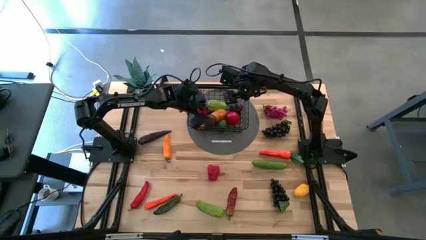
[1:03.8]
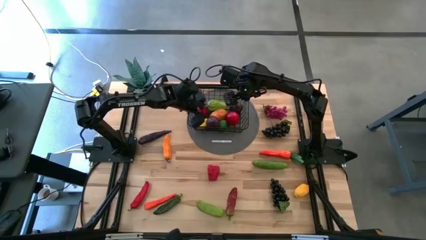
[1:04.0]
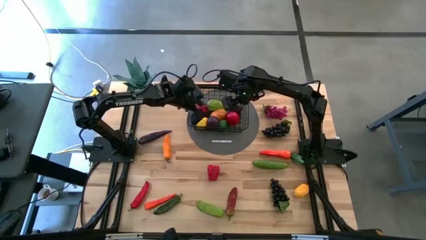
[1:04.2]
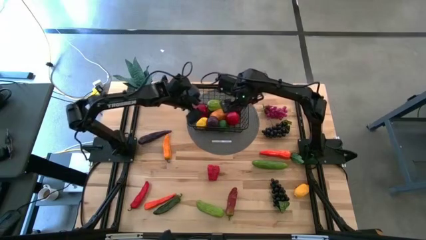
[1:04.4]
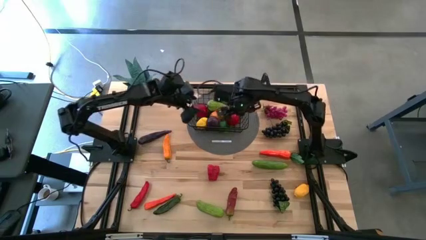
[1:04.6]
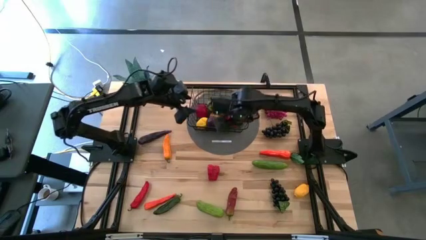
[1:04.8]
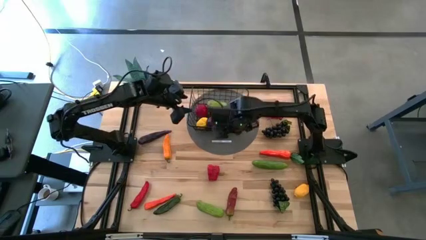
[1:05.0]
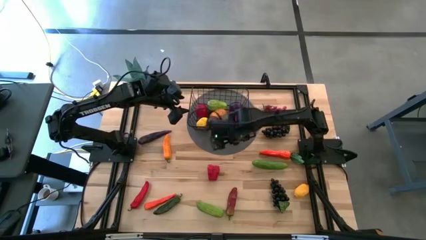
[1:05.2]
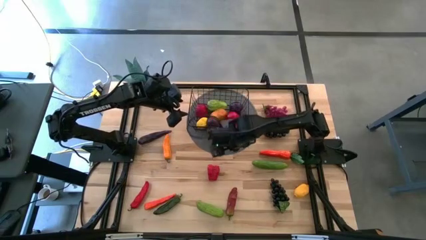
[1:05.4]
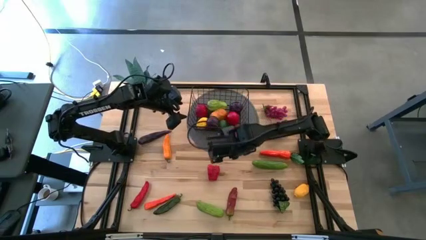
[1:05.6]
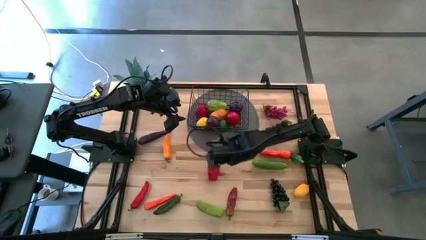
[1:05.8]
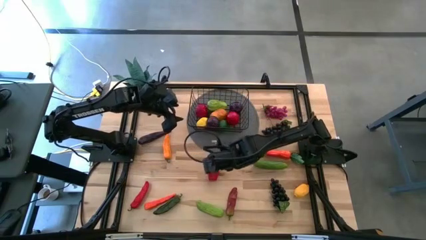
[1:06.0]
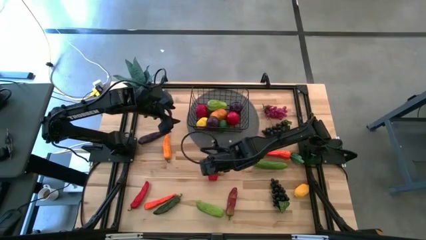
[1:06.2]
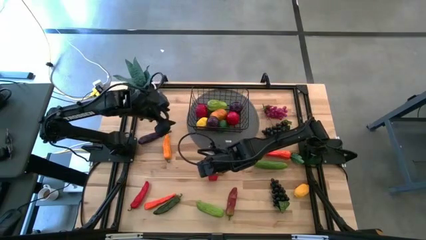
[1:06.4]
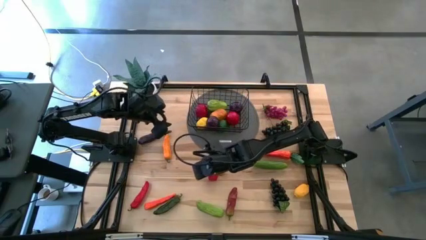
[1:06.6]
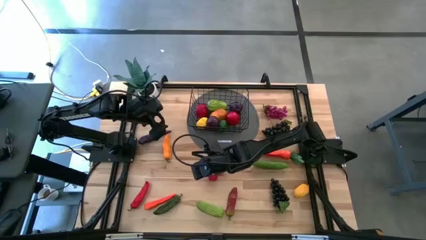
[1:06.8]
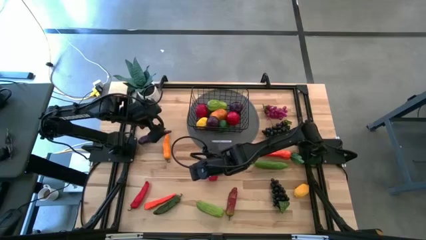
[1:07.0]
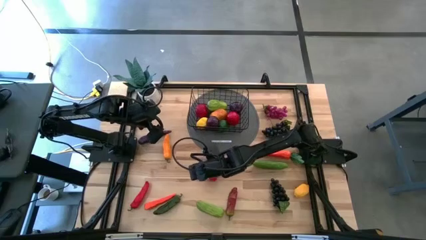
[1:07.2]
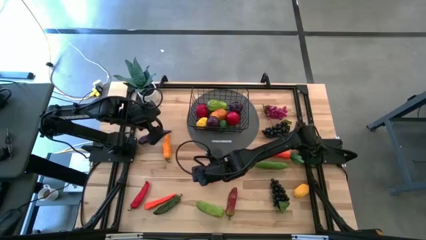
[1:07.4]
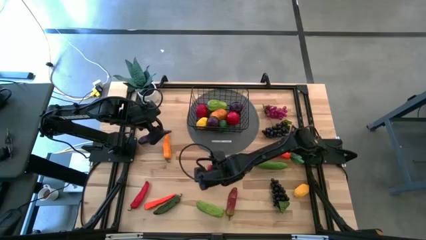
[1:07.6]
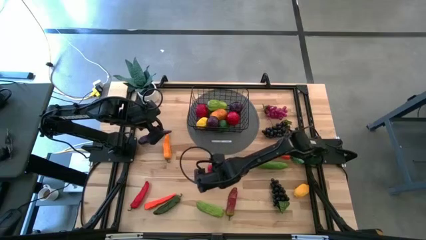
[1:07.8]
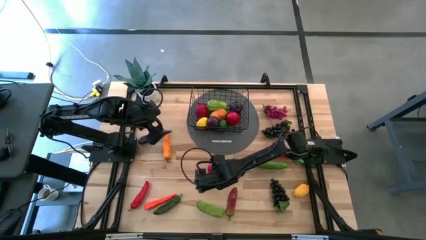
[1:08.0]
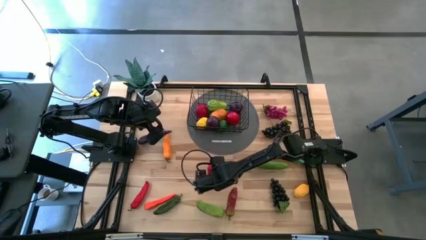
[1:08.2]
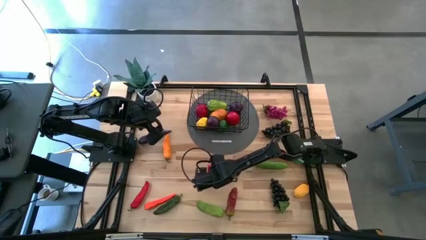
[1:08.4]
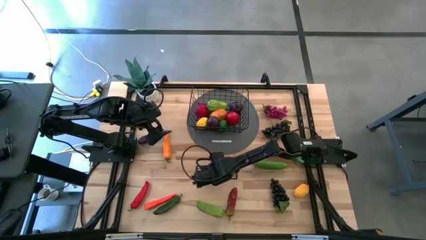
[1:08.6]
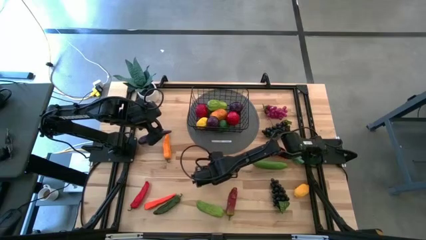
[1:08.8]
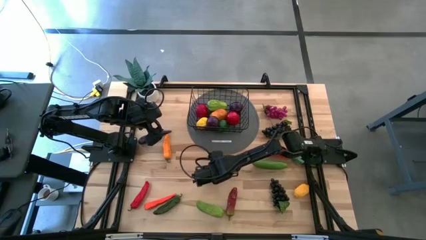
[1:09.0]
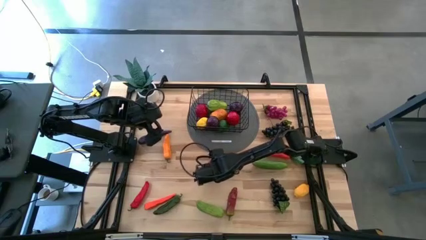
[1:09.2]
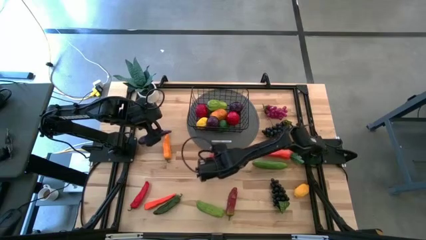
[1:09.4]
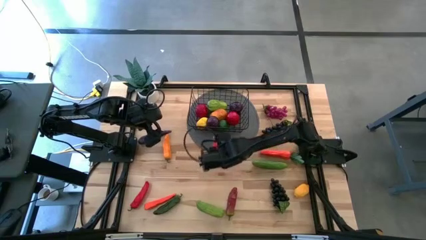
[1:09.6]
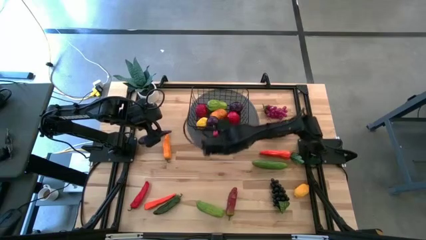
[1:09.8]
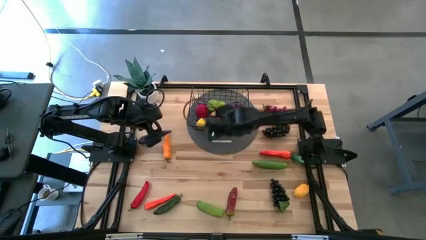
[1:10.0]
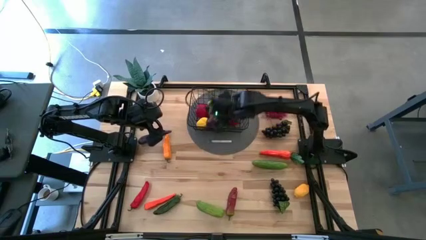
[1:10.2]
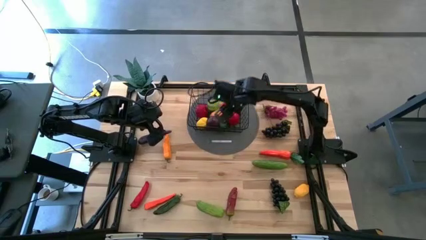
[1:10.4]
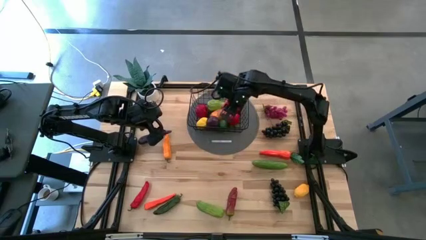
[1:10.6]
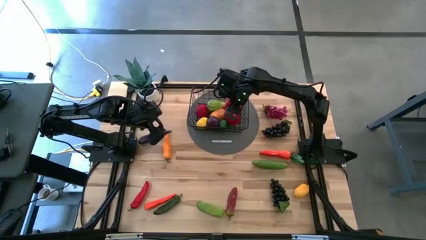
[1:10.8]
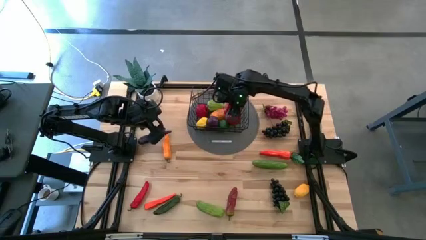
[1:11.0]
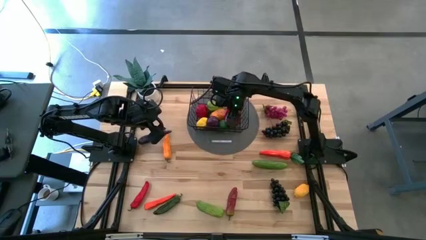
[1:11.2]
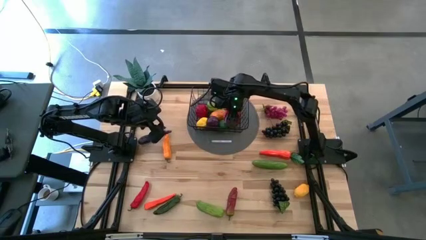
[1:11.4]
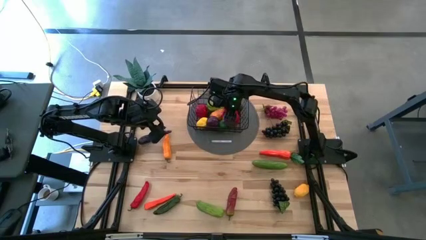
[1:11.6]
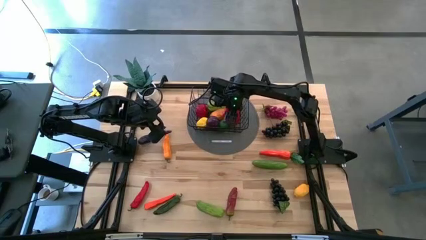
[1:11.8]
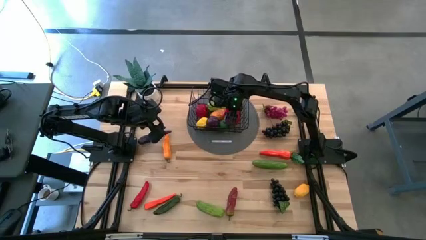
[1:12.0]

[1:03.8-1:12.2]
Task: Build produce basket
Put the red bell pepper into the wire basket

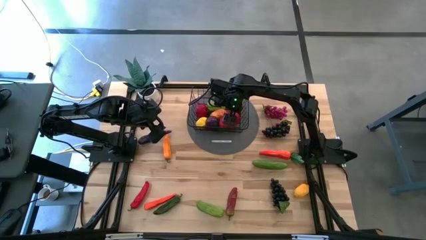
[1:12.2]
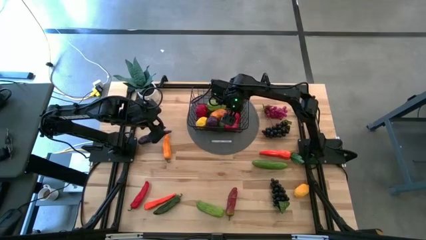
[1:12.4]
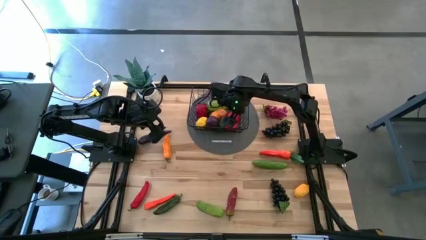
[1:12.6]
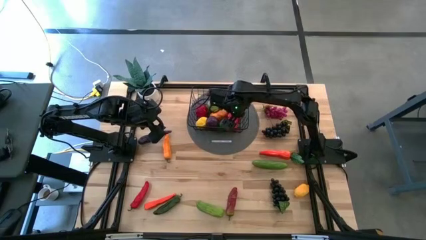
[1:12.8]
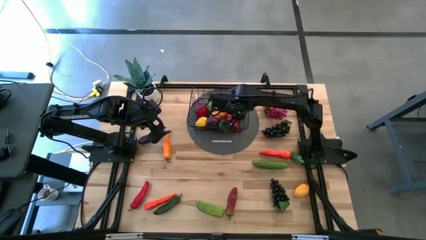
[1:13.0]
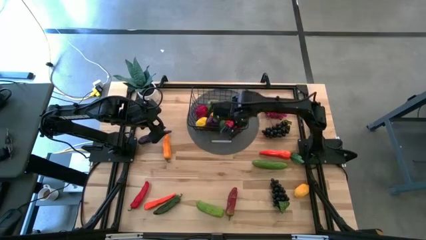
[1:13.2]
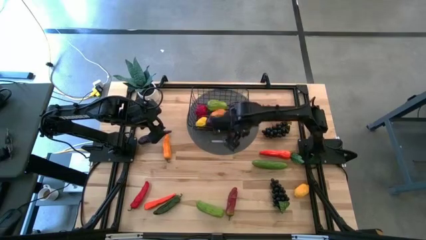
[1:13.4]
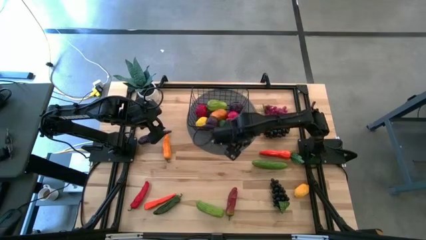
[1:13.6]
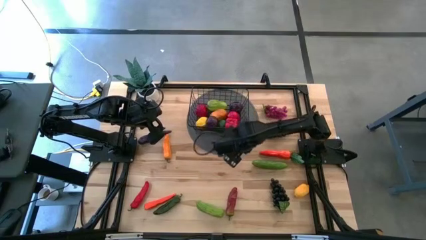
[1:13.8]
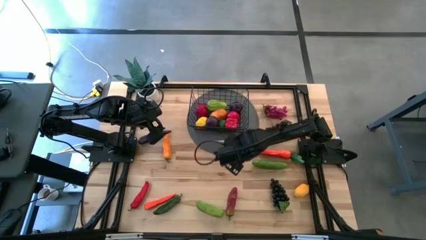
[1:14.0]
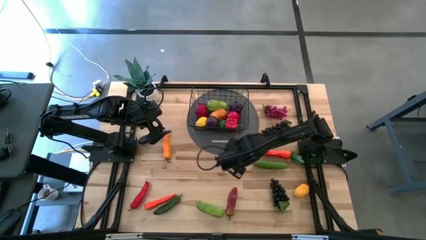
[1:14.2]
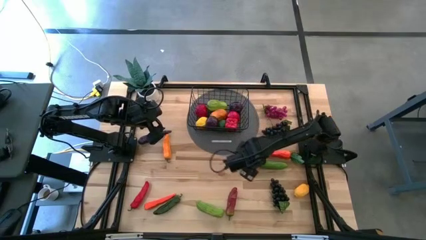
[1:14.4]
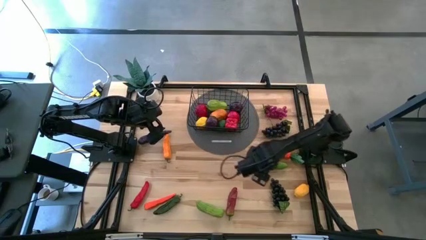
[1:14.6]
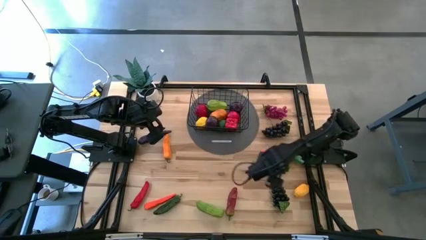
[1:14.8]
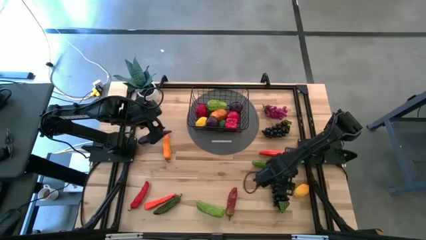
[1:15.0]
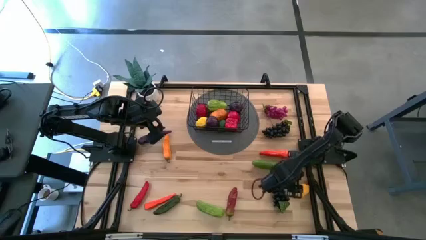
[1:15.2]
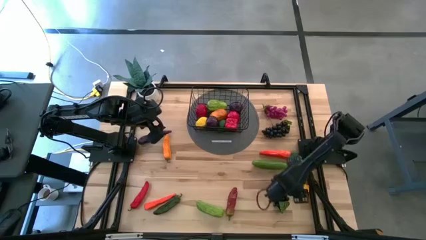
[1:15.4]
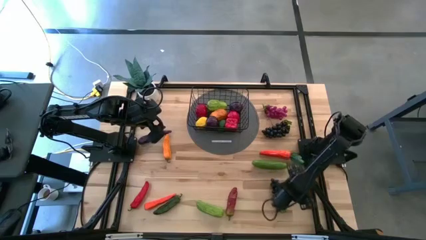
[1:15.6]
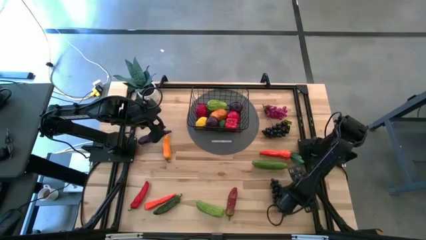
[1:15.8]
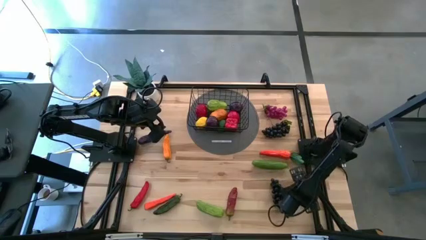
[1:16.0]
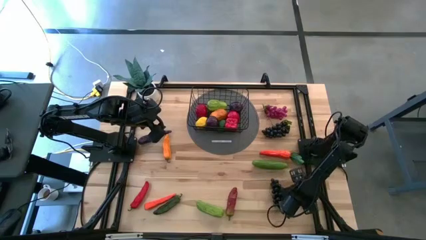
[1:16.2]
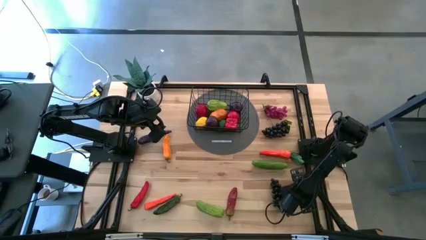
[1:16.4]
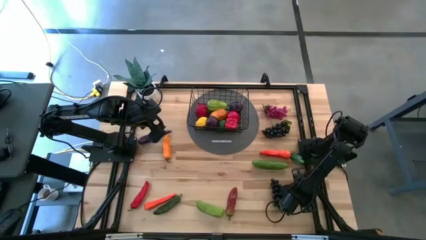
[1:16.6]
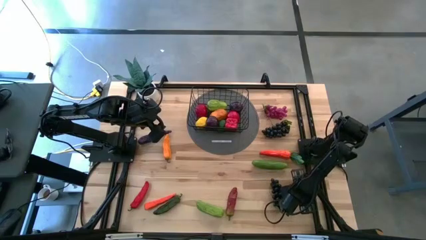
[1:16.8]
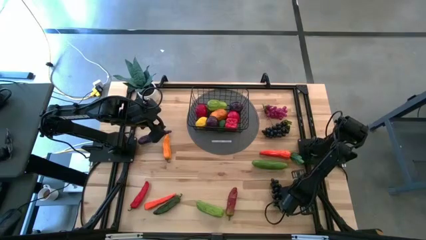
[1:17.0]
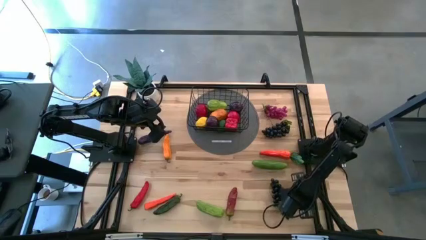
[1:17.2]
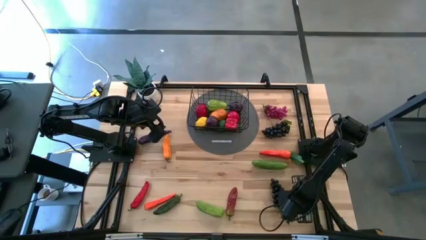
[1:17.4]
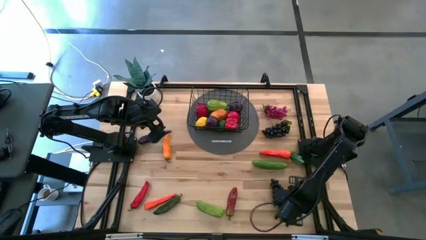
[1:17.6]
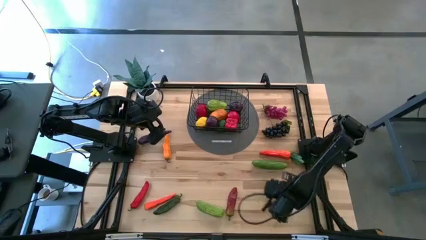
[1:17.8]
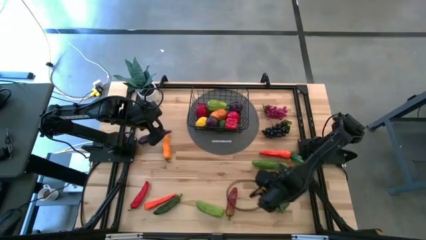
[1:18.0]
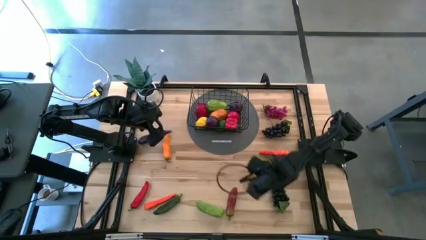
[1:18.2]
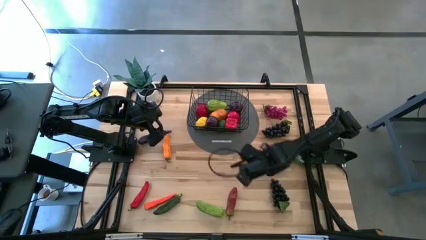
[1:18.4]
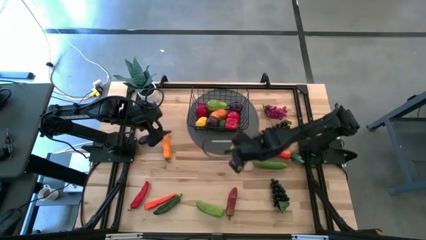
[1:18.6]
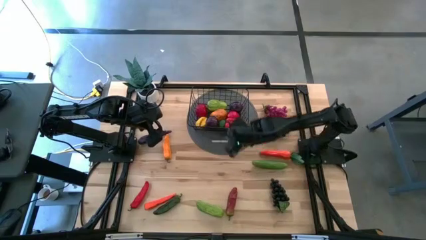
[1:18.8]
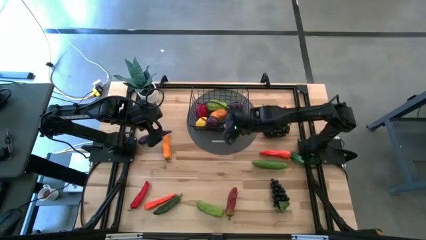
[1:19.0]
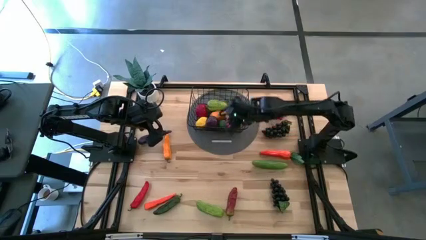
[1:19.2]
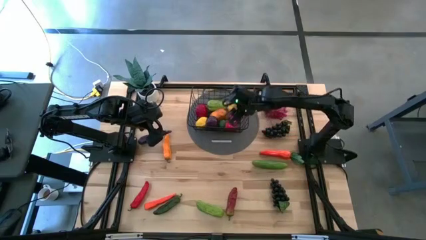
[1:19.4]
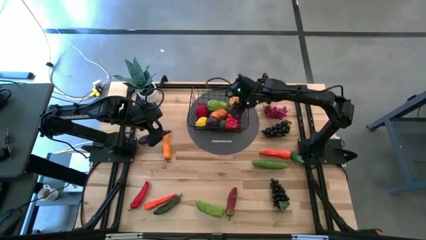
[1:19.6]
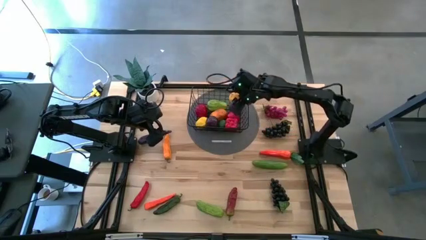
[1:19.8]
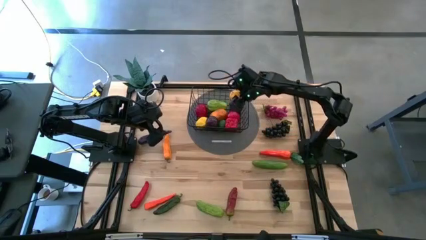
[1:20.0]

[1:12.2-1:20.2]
Put the lemon into the wire basket
